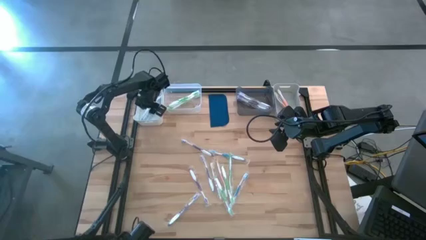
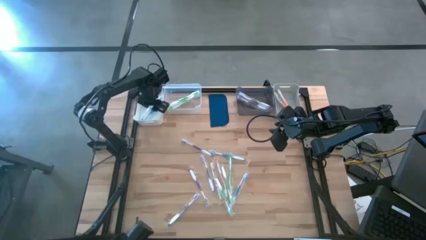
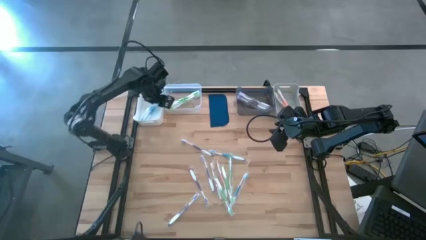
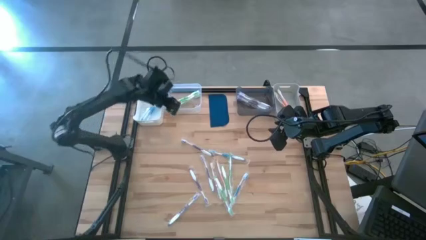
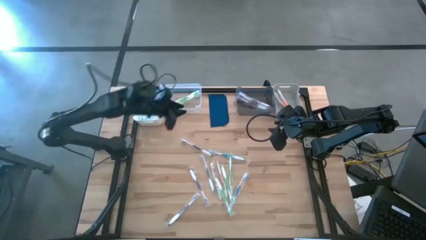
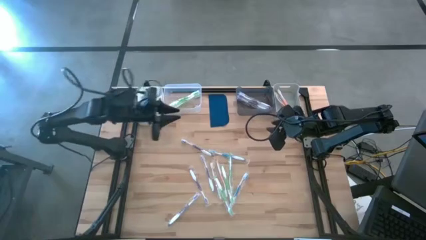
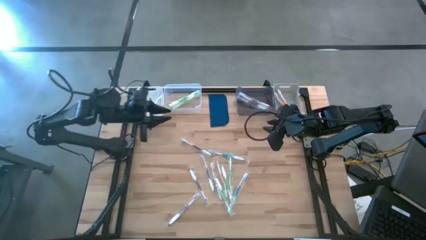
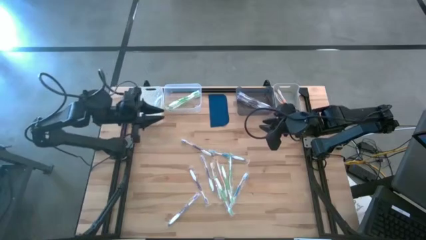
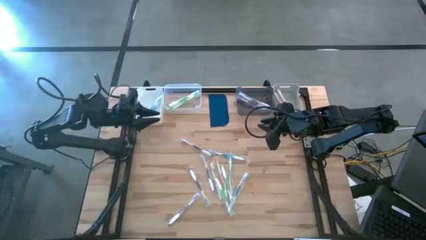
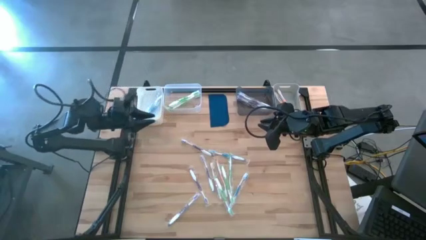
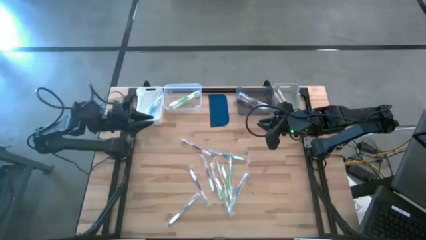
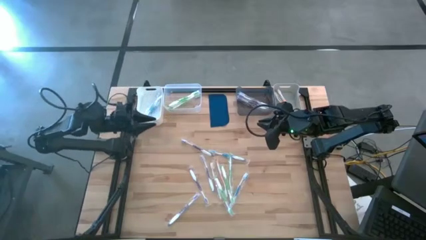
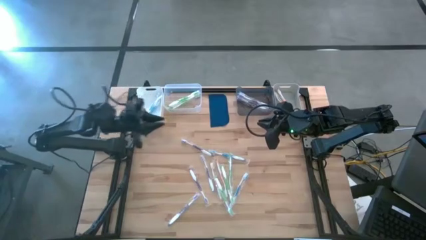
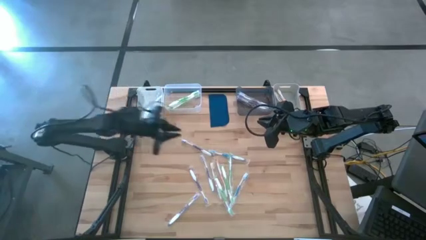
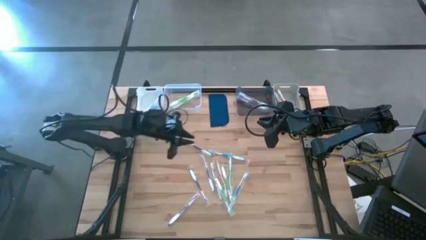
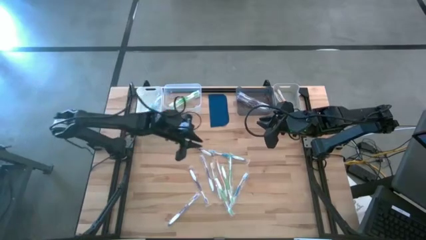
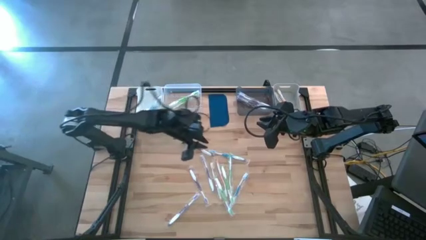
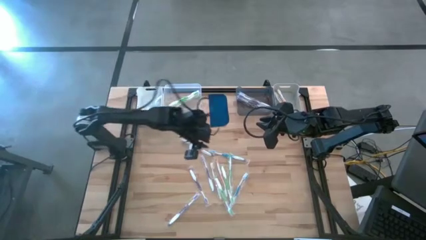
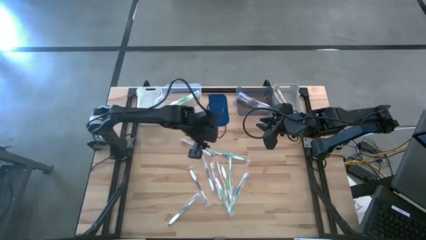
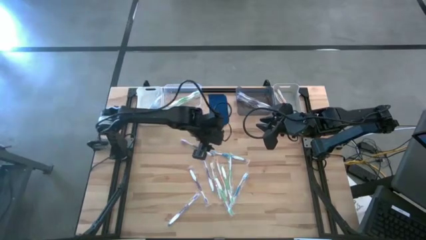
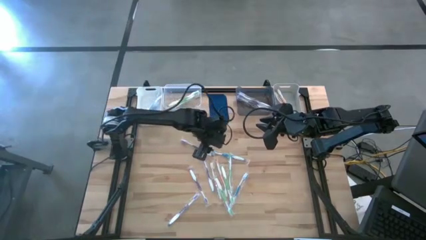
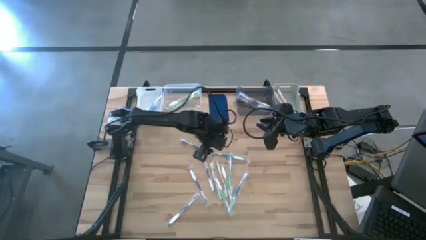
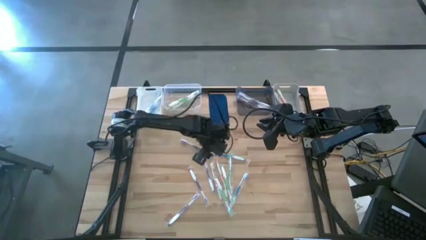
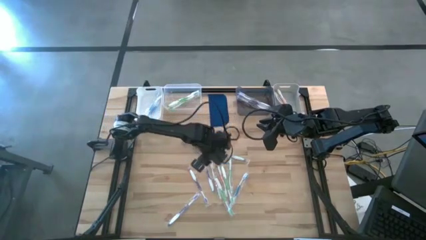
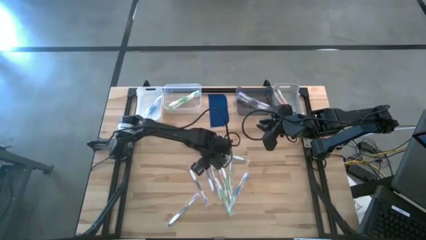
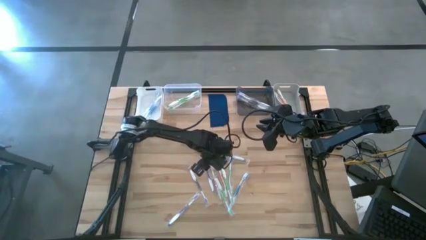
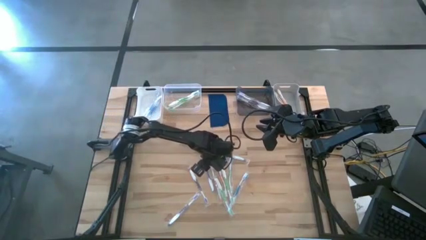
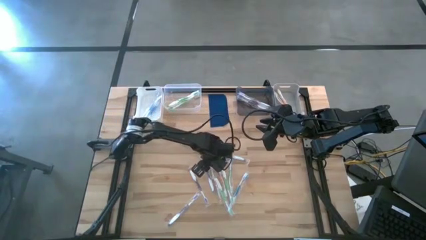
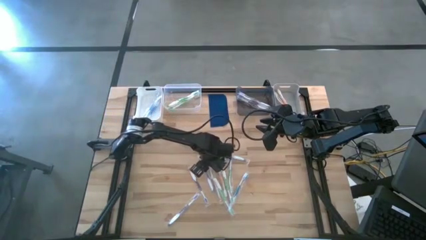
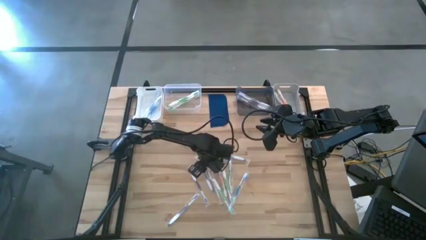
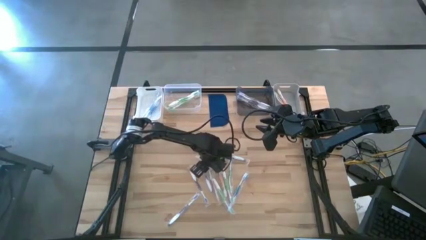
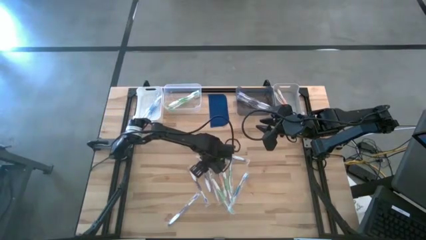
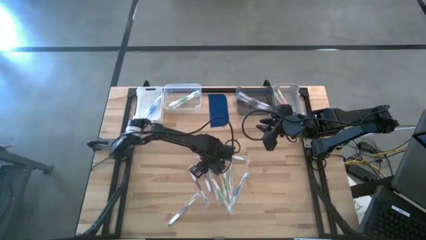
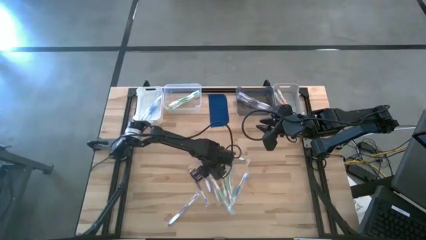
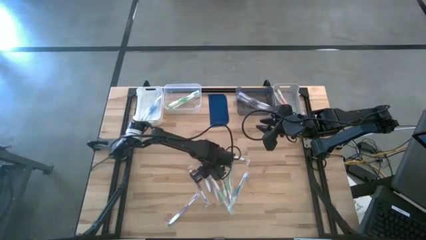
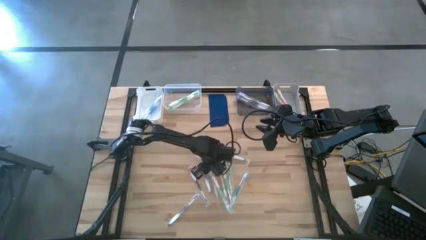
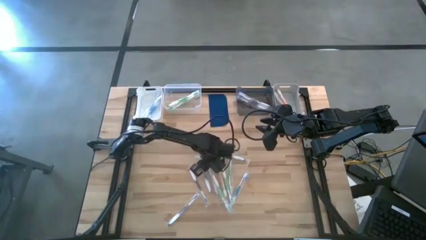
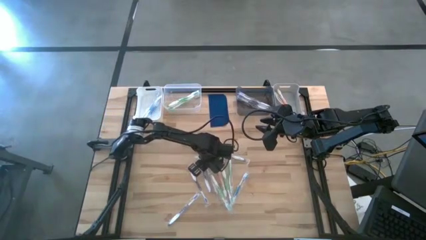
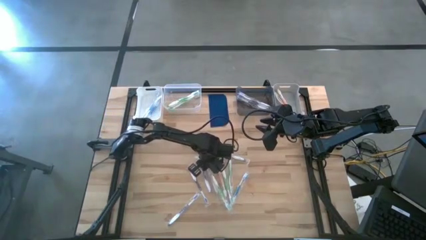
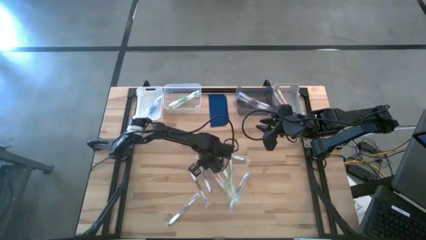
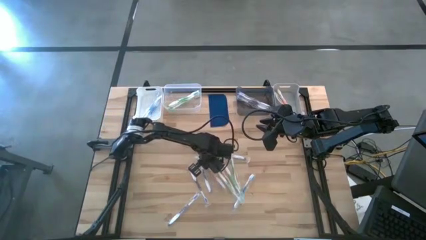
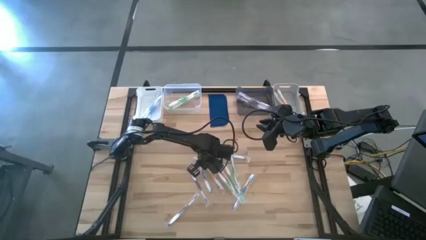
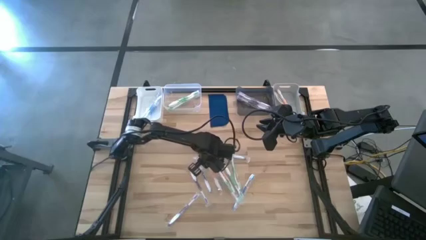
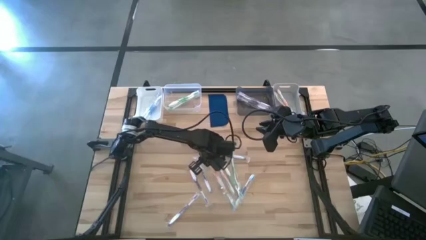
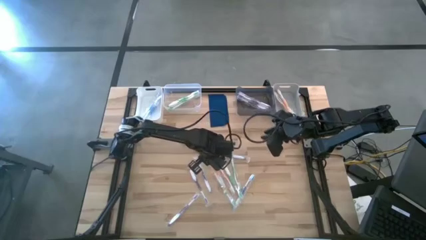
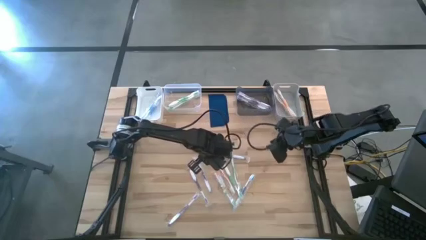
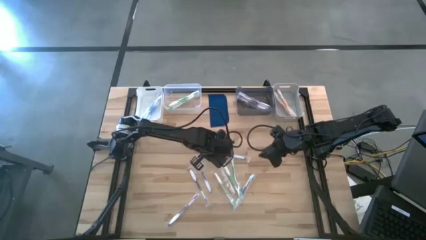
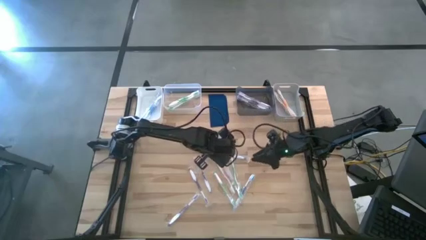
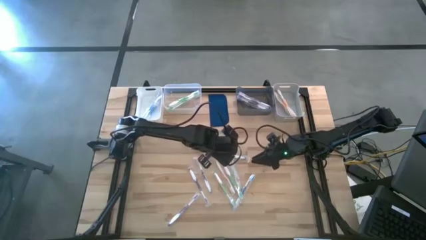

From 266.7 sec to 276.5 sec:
Task: Pick & Place Toothbrushes
Put the orange toothbrush into the gray bin

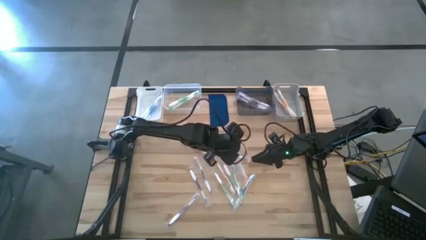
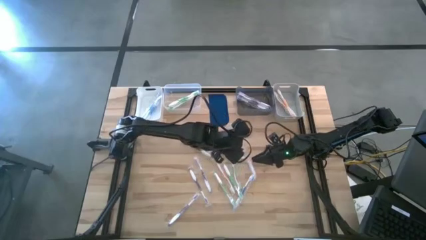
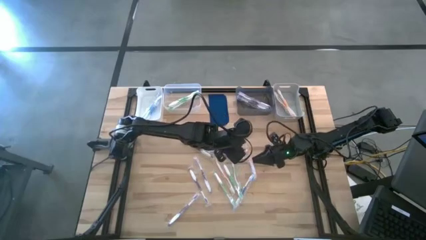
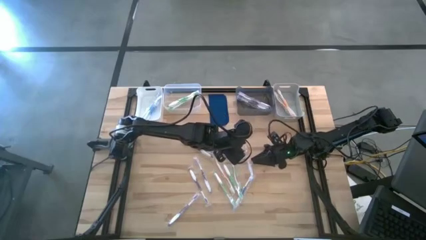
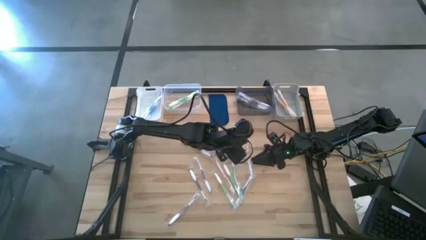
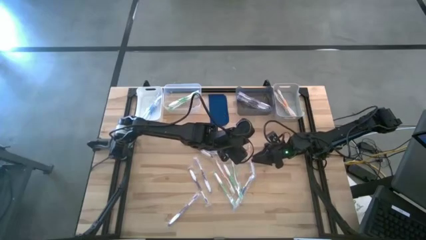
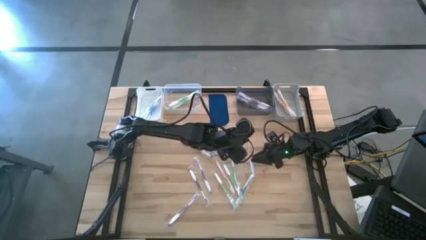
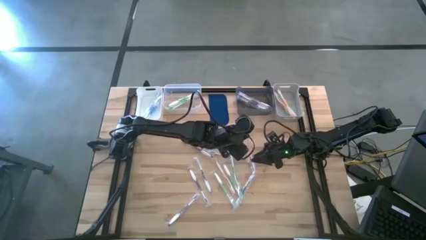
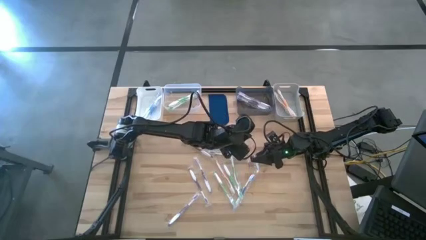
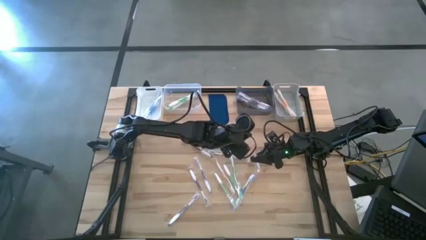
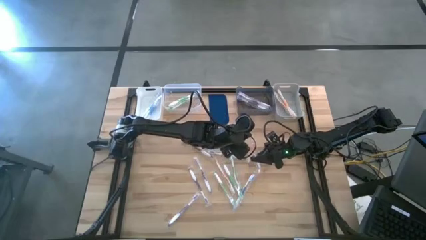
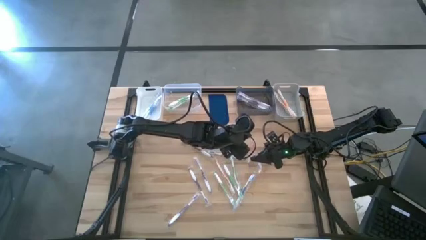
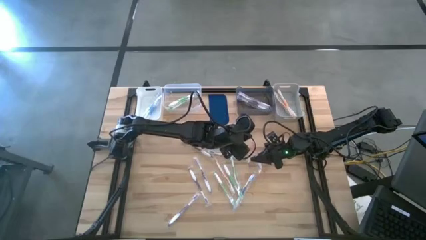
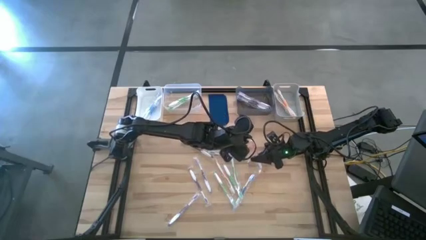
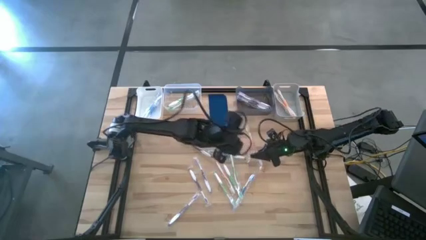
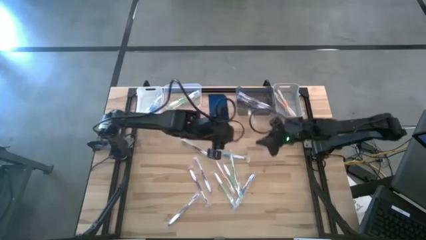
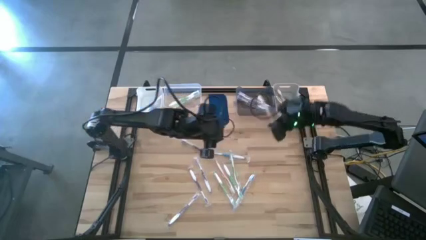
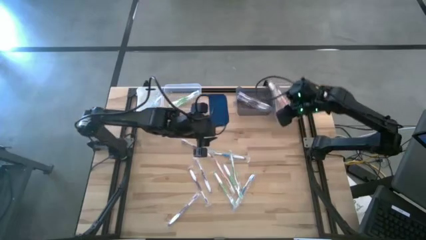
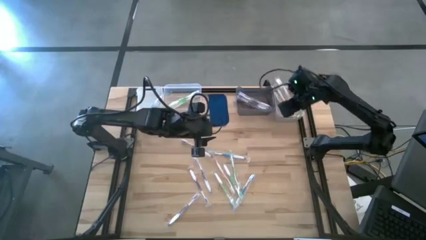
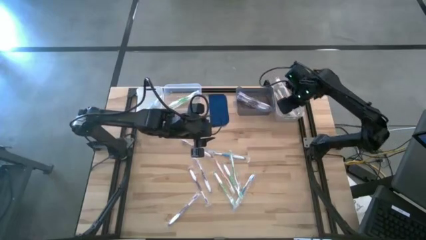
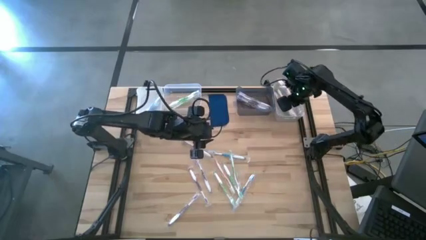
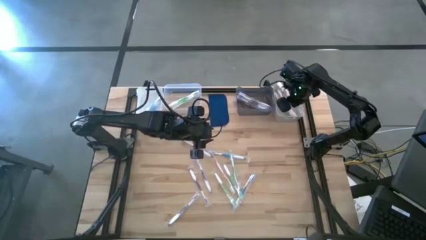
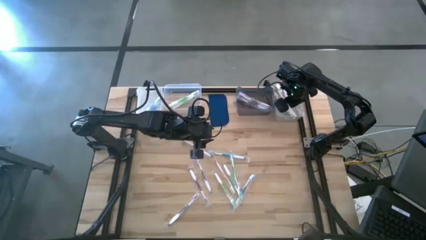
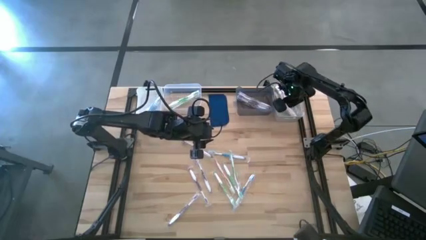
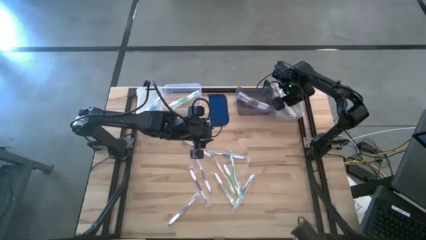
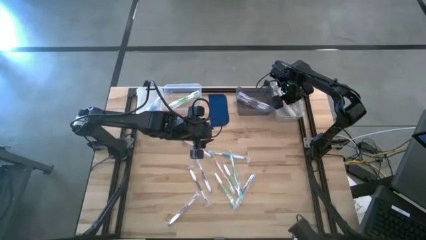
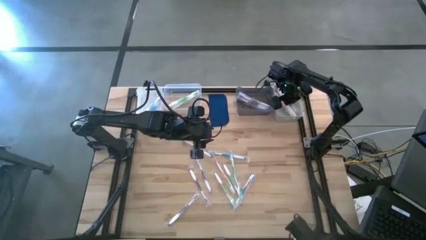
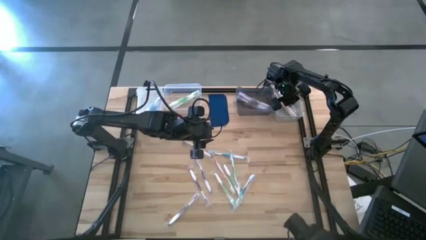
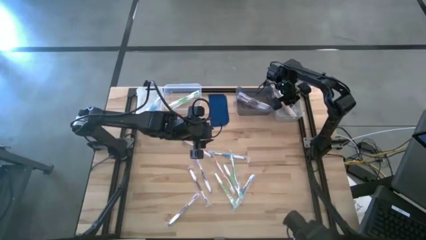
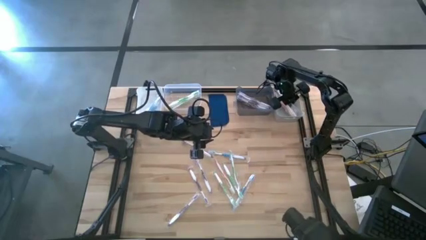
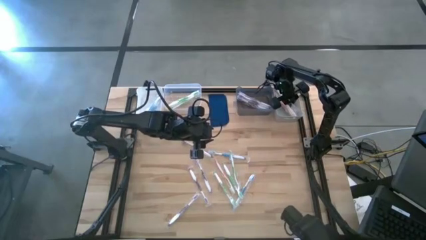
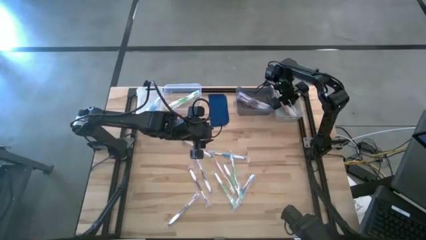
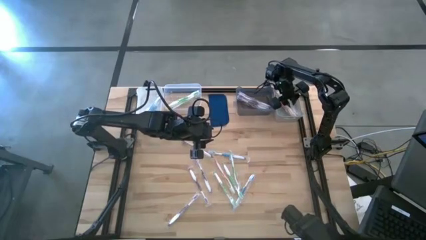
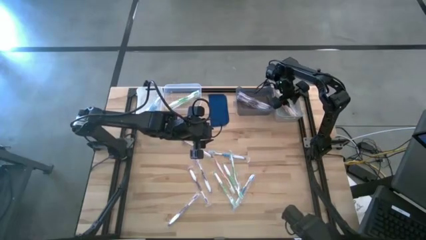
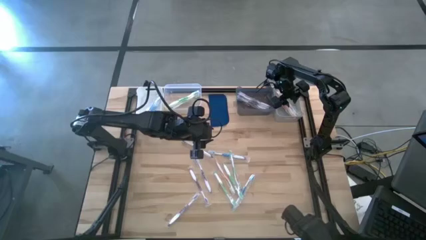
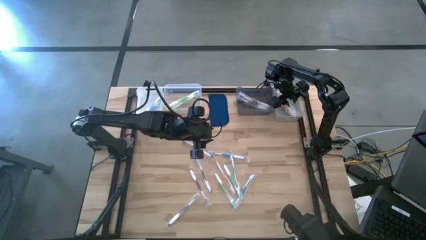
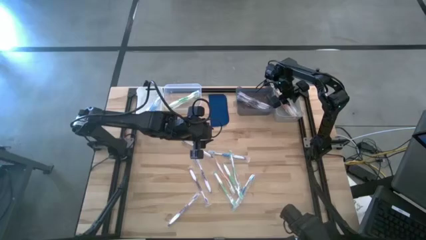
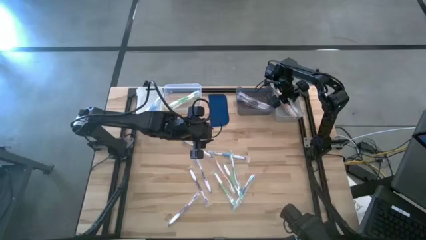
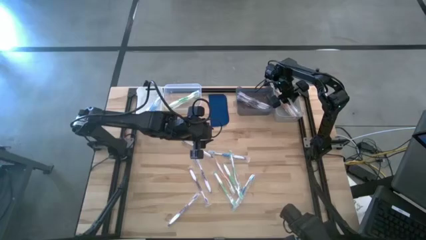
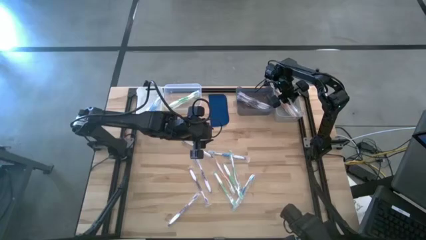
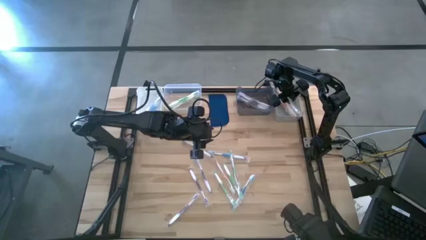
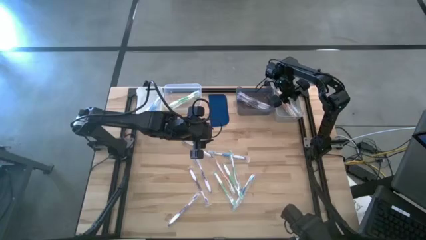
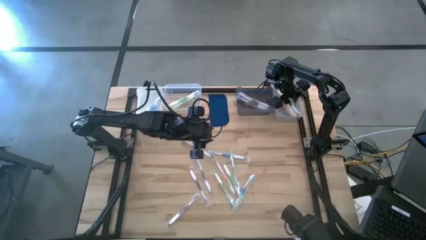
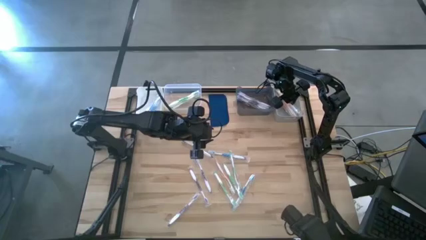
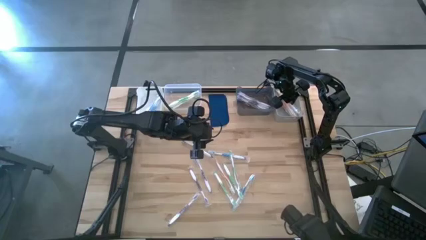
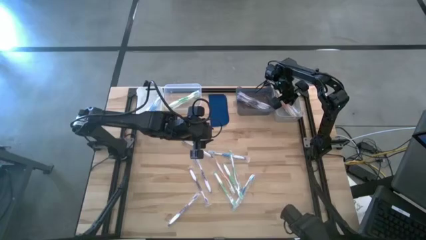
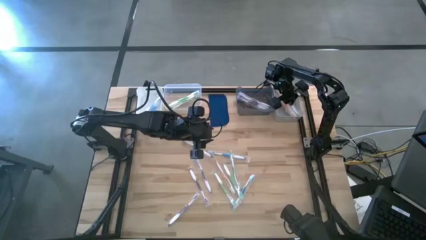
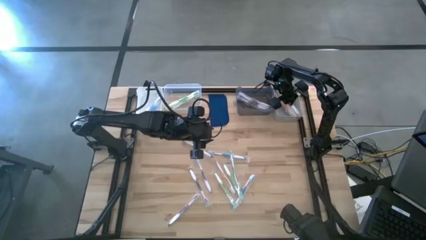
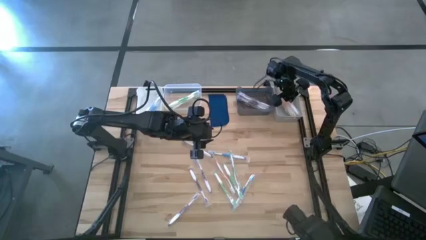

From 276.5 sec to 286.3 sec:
Put the orange toothbrush into the gray bin
